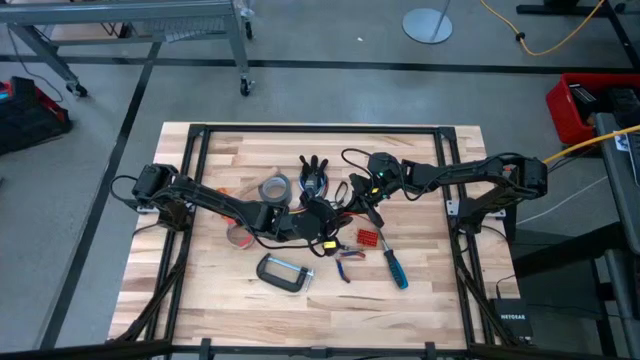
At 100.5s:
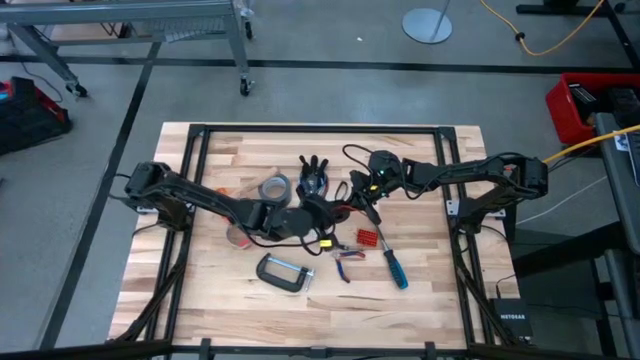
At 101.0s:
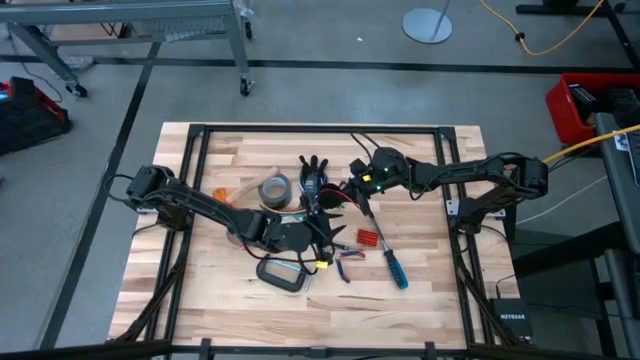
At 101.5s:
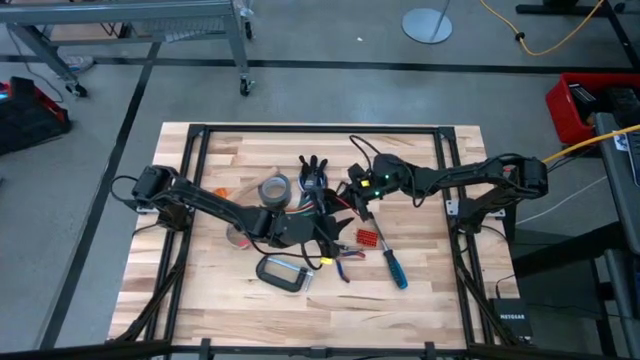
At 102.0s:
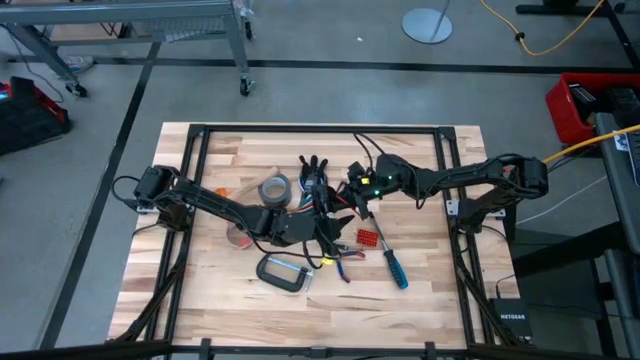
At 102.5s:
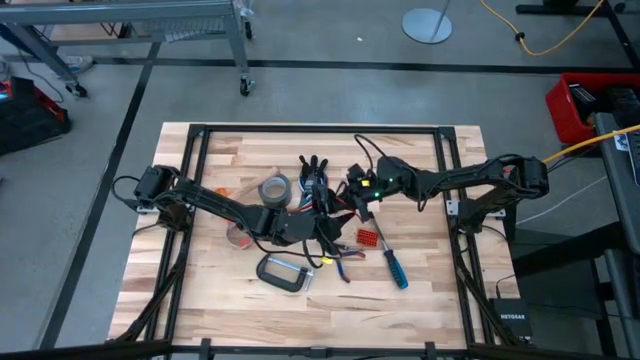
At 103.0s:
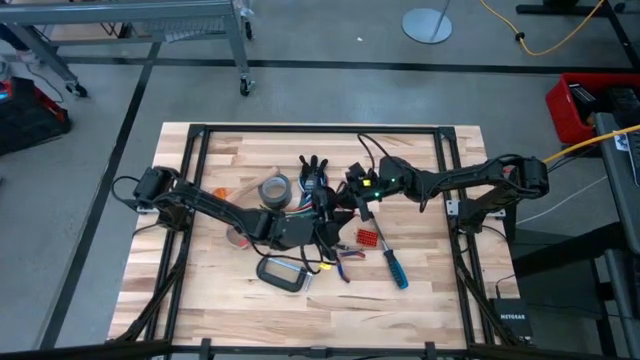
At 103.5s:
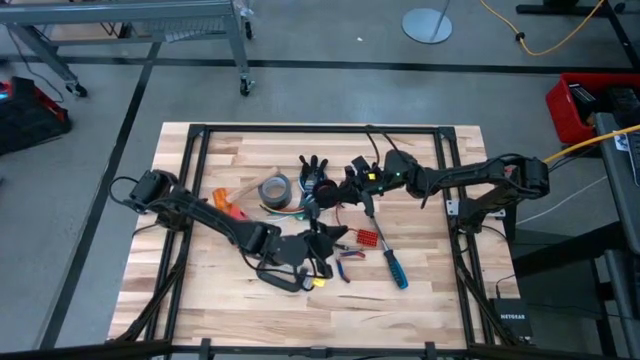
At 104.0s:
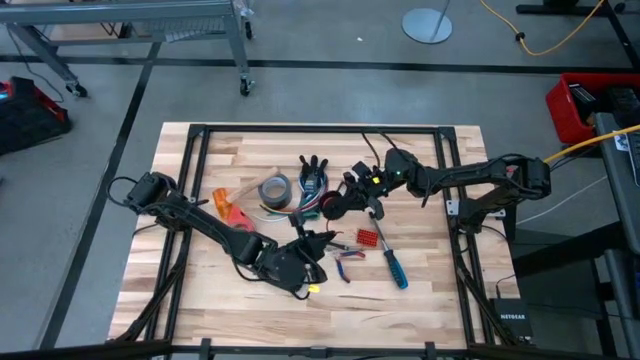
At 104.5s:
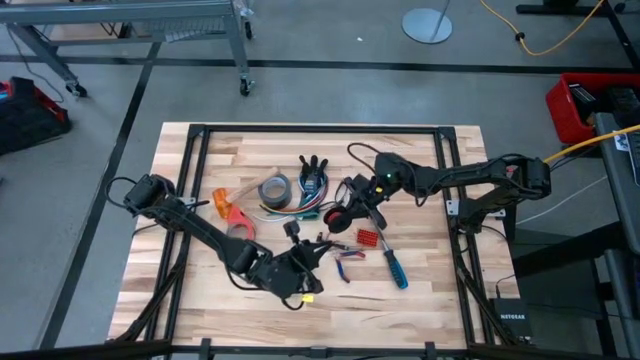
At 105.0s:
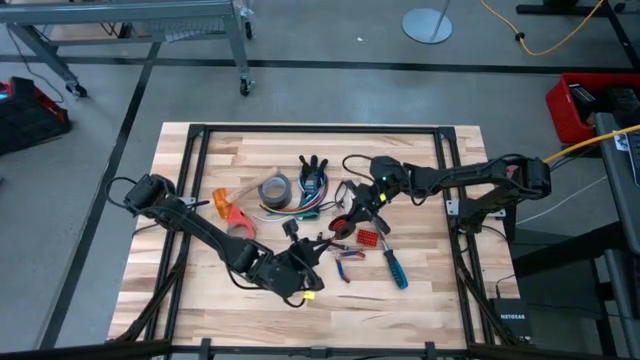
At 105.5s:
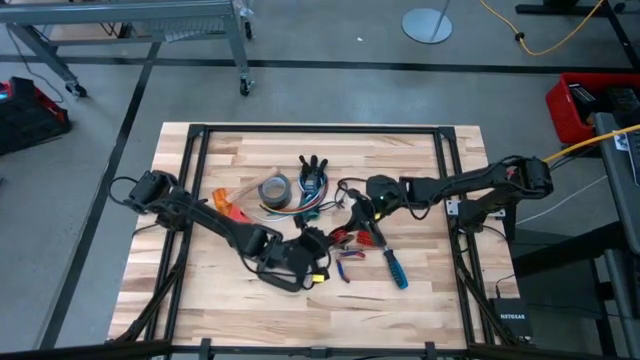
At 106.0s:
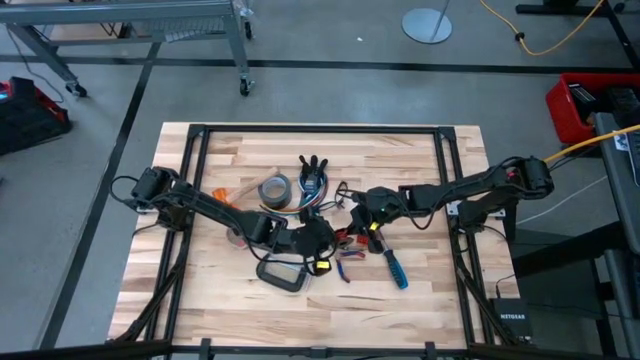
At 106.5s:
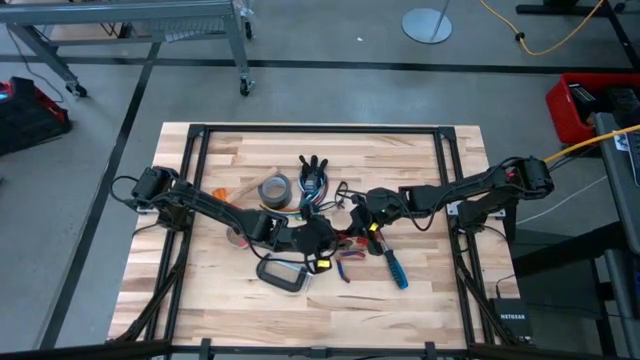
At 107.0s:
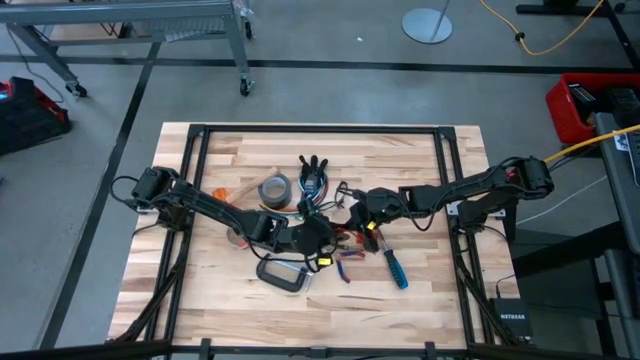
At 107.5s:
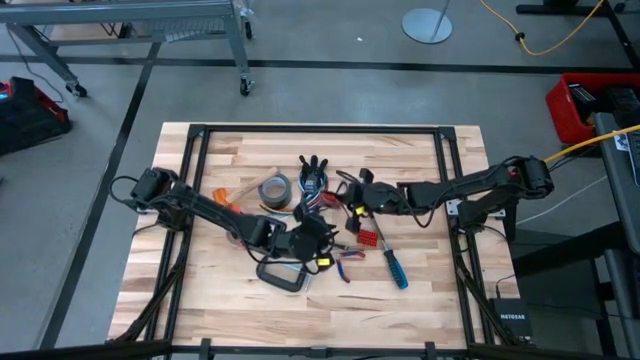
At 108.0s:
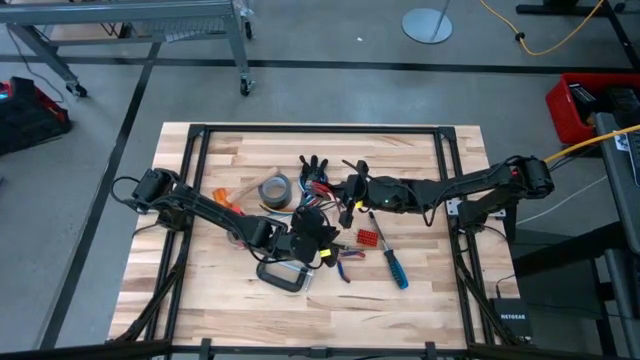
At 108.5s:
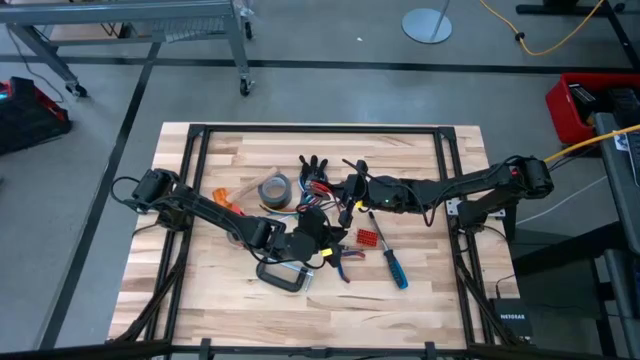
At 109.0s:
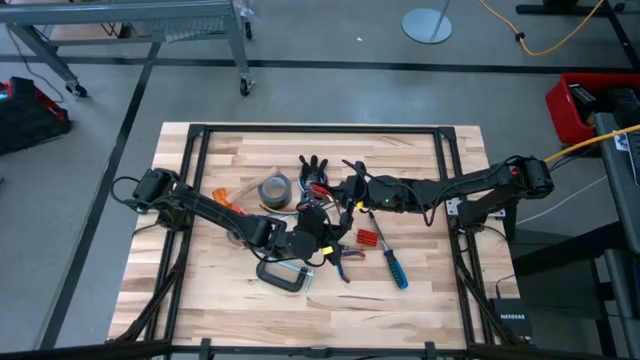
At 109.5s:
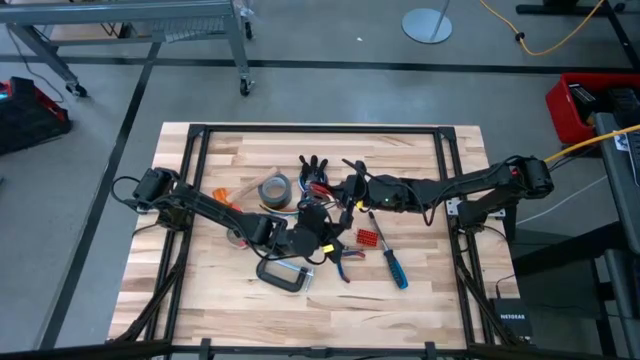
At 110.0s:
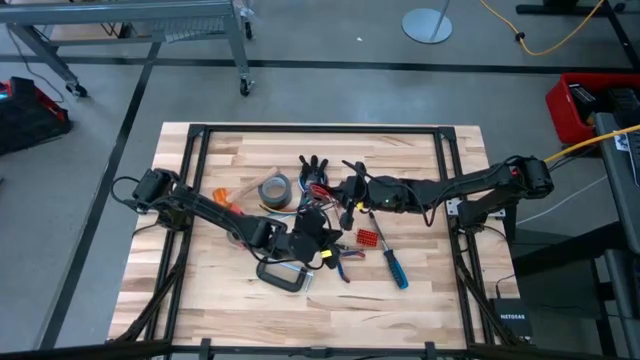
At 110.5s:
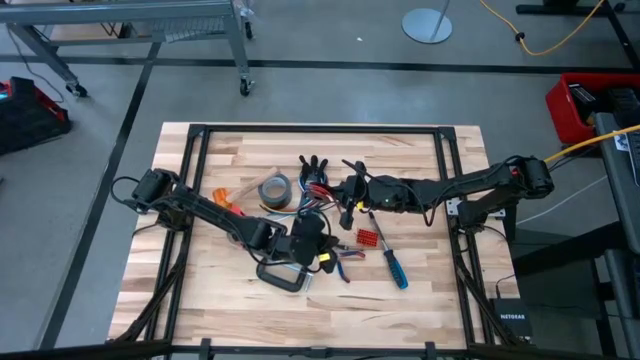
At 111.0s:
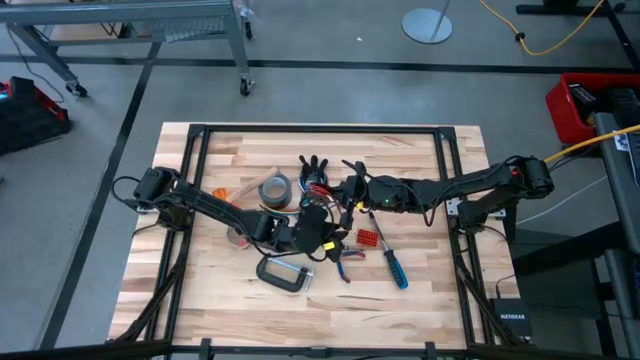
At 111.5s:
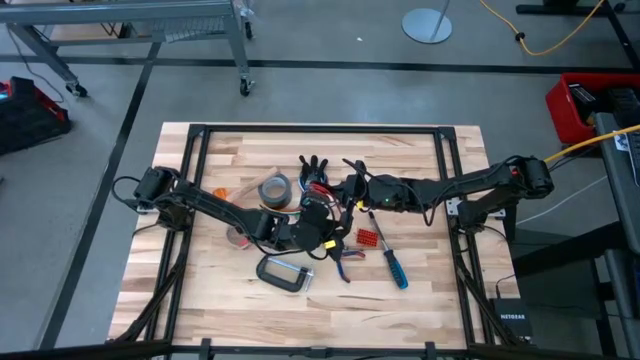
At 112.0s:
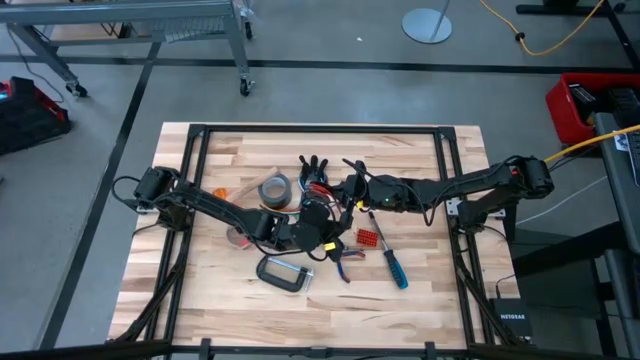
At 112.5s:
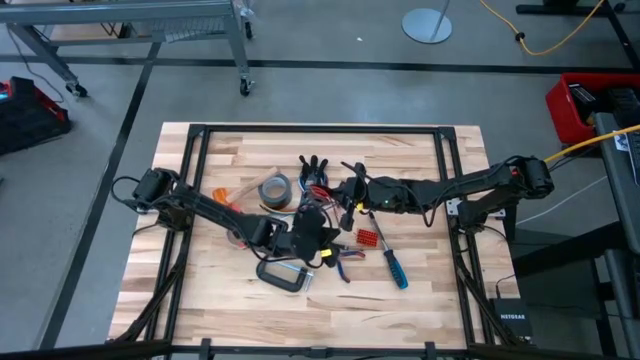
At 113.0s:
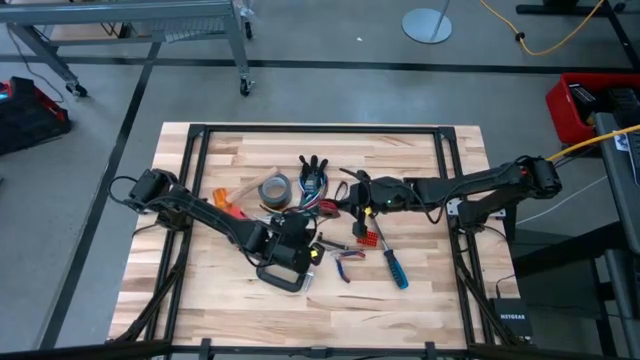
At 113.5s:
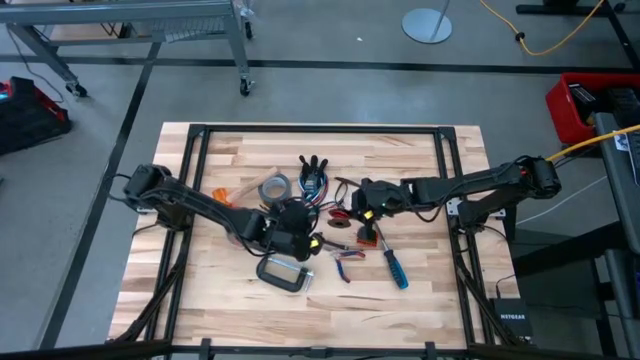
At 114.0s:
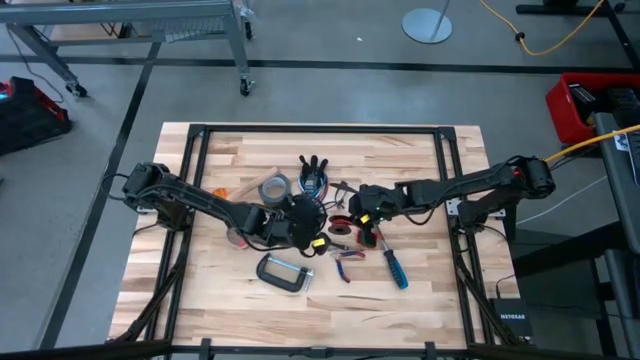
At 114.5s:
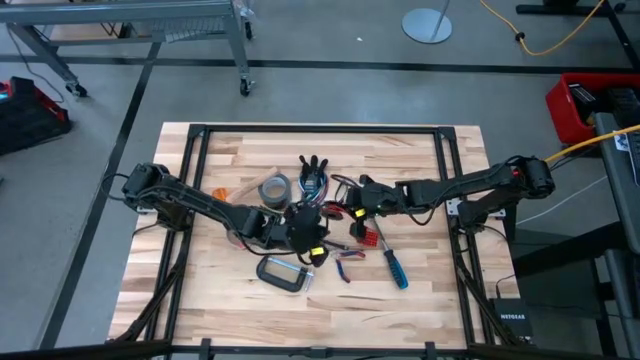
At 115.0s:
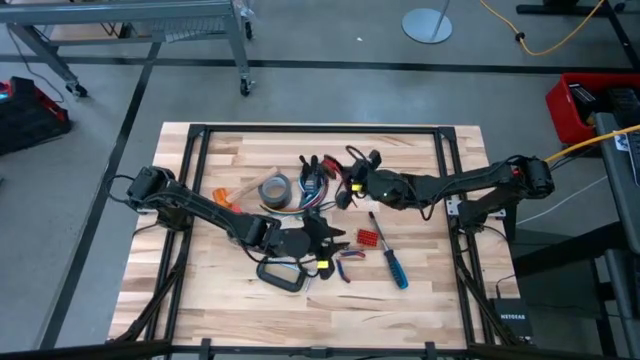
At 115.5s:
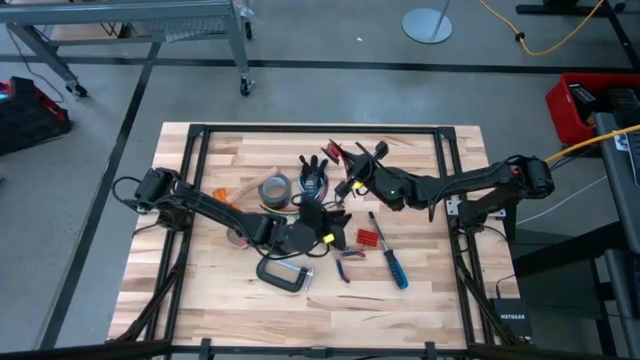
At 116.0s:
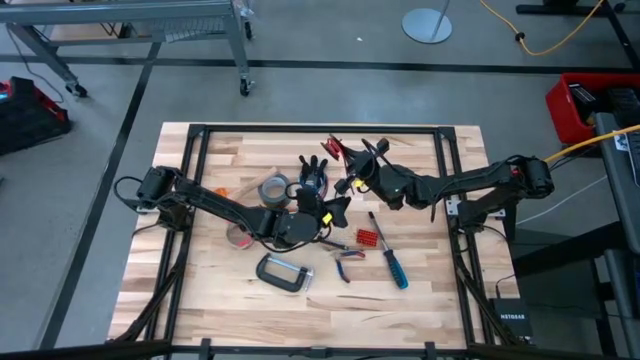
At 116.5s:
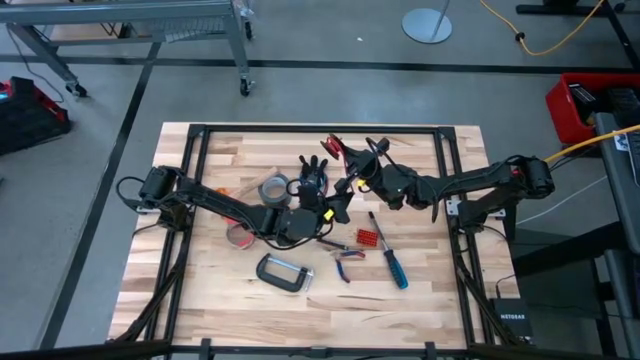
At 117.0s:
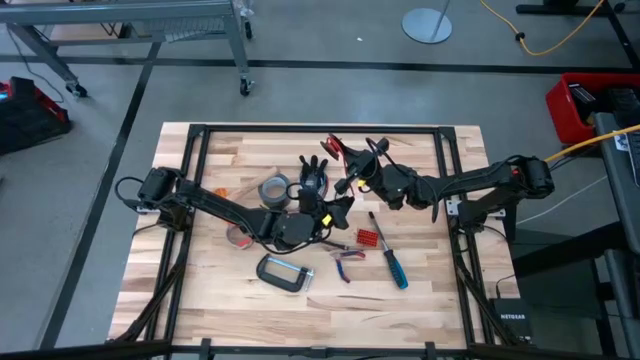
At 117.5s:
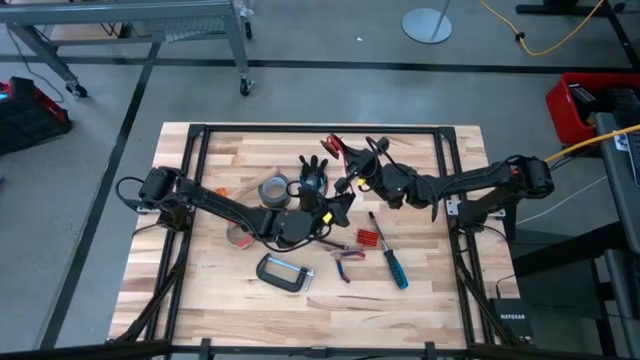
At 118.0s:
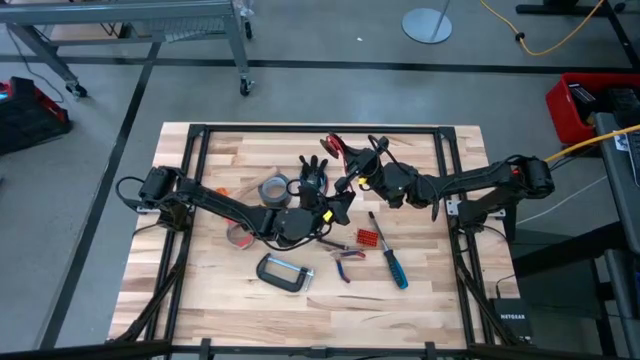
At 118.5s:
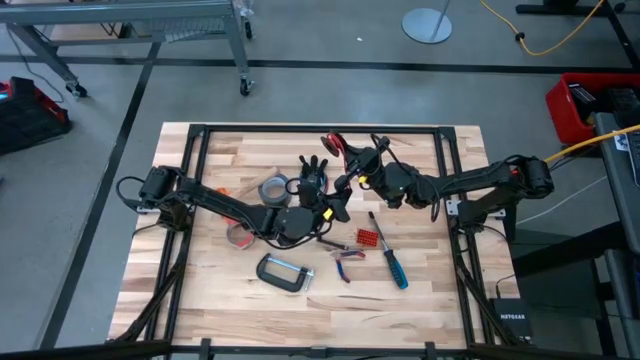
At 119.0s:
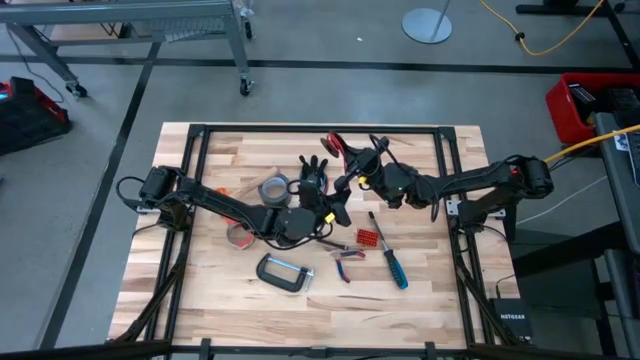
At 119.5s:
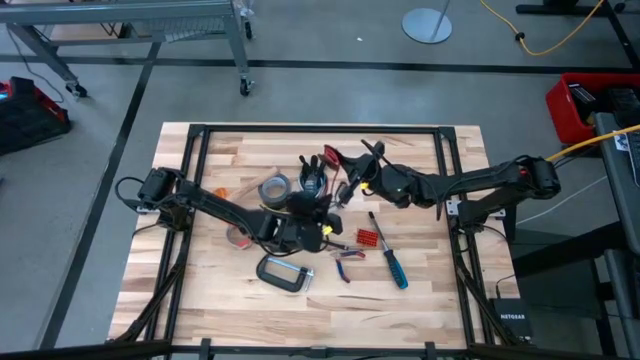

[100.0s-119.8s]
Task: Coil cords
Coil the red wire onto a black spool

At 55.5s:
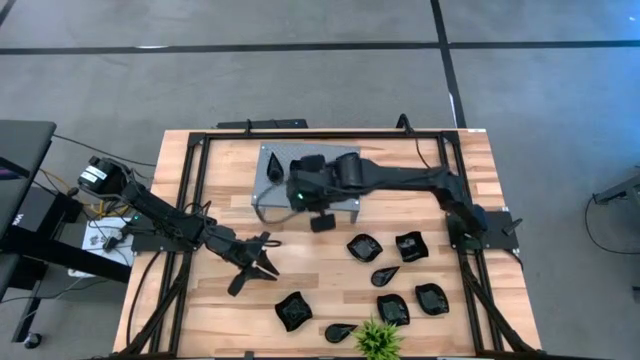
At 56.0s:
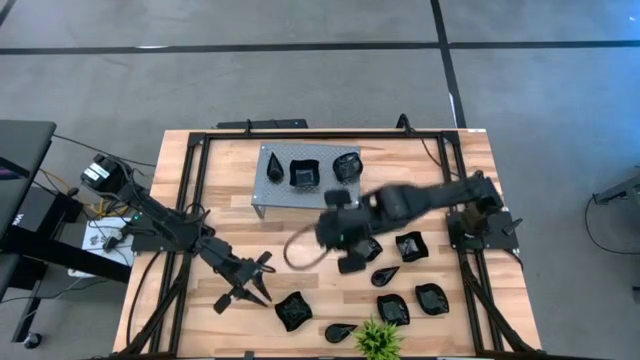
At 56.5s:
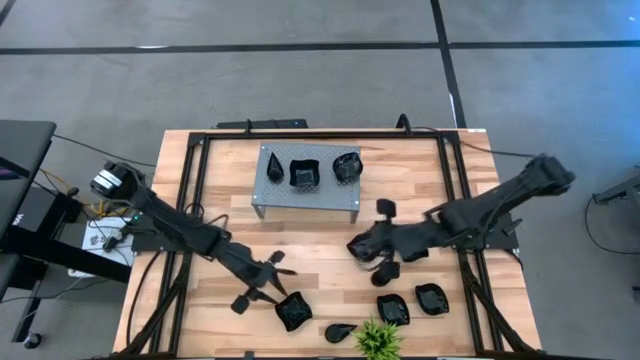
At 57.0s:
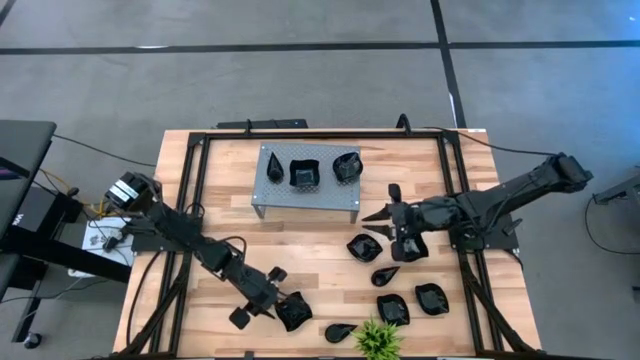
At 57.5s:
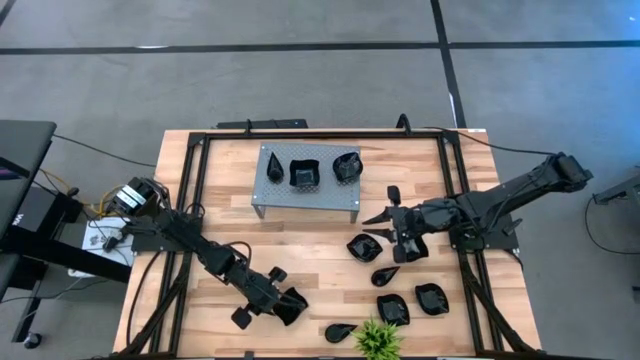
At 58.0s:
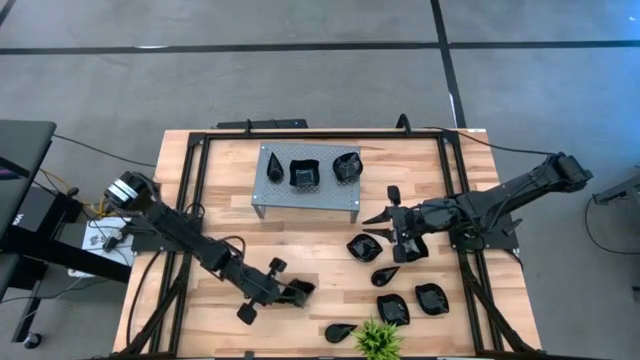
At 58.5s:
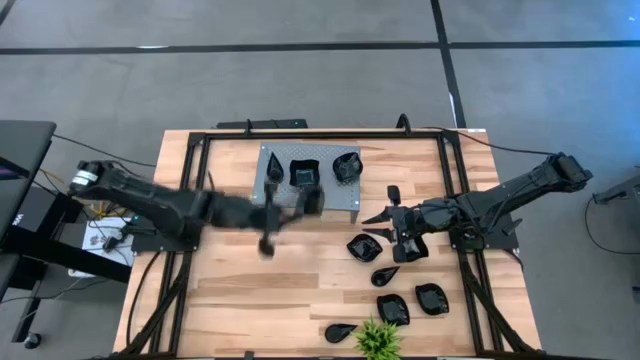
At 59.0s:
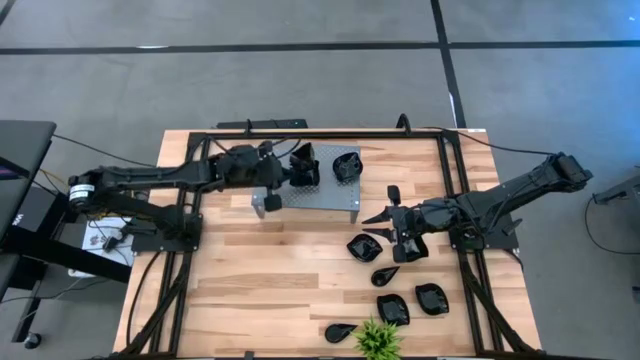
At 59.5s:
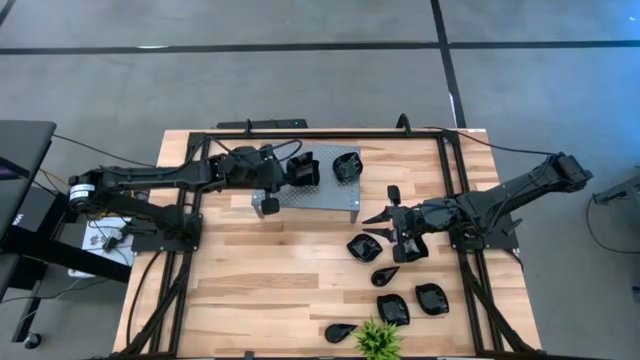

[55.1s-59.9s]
Task: Pick & Place Mini shaped plates
Stack the black distorted square plate on top of the black distorted square plate on the shelf
